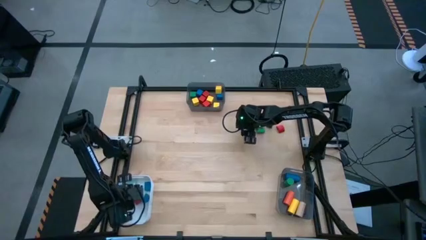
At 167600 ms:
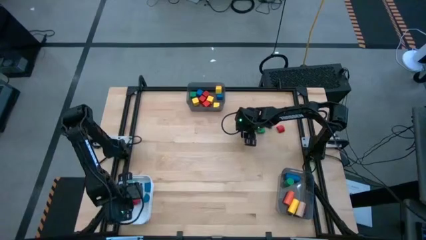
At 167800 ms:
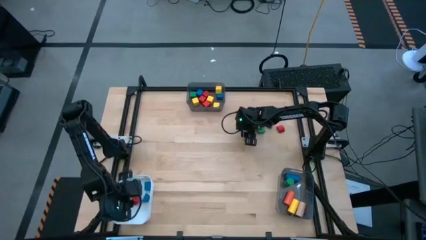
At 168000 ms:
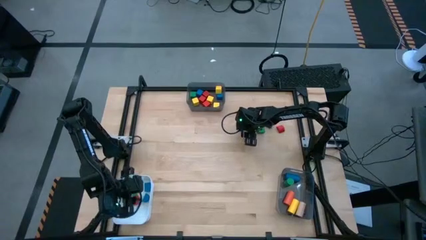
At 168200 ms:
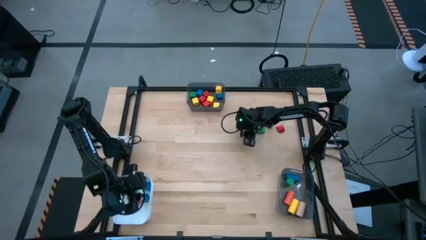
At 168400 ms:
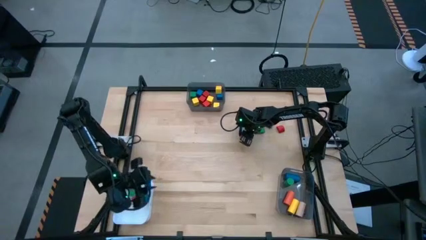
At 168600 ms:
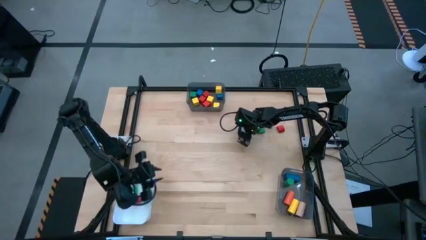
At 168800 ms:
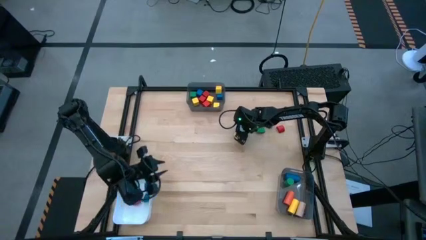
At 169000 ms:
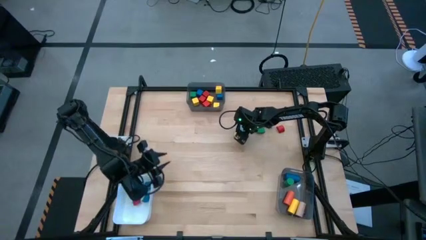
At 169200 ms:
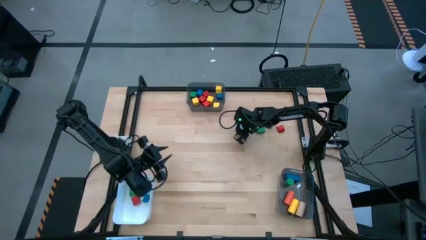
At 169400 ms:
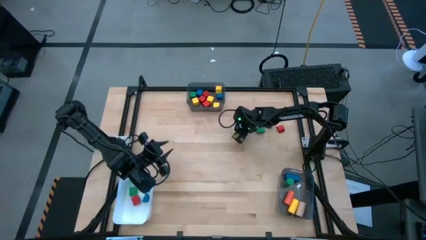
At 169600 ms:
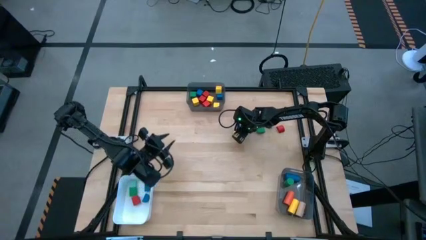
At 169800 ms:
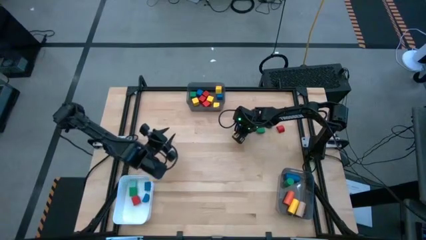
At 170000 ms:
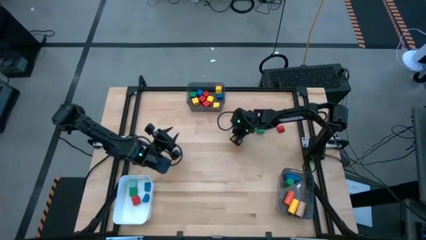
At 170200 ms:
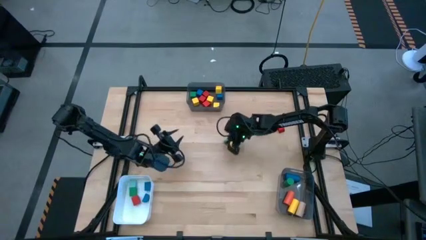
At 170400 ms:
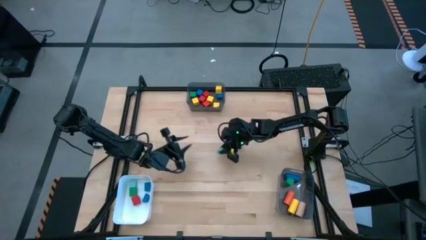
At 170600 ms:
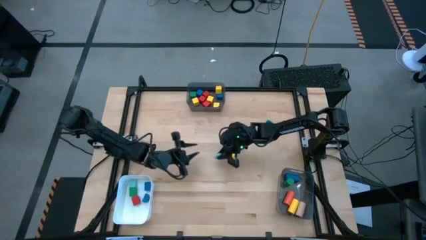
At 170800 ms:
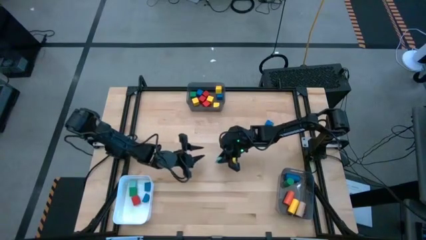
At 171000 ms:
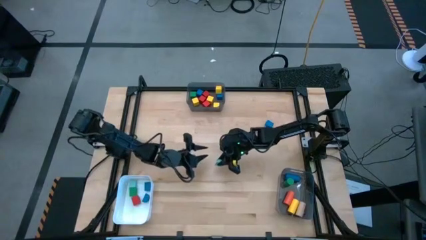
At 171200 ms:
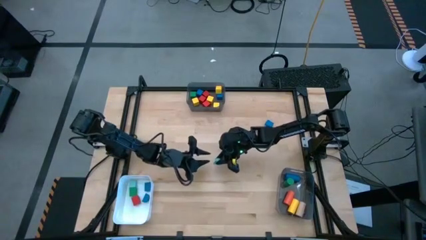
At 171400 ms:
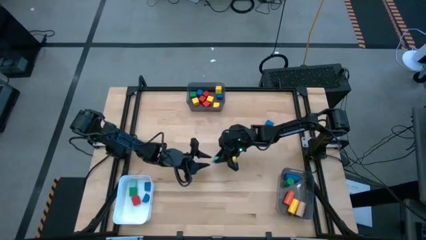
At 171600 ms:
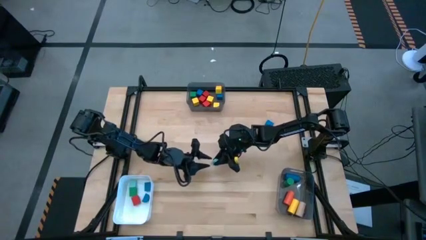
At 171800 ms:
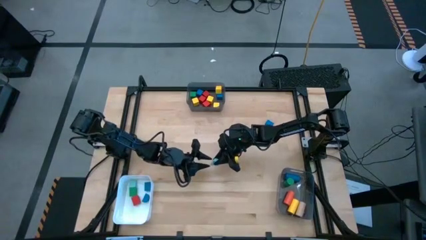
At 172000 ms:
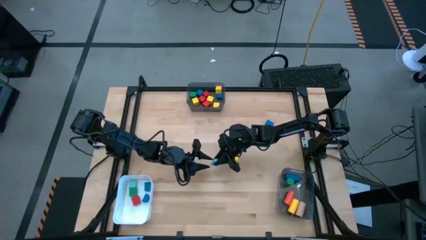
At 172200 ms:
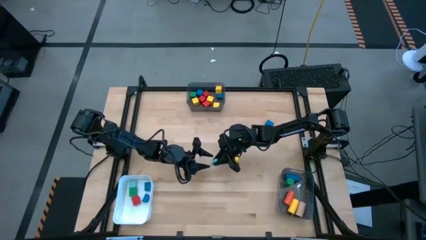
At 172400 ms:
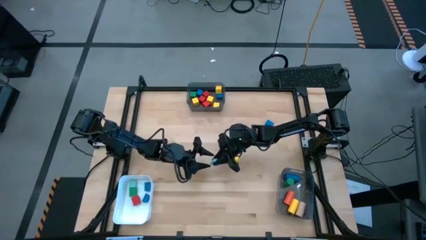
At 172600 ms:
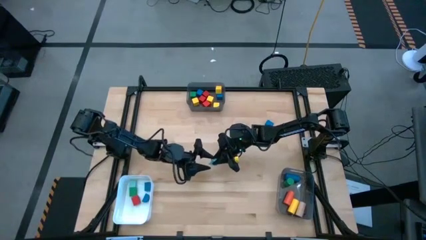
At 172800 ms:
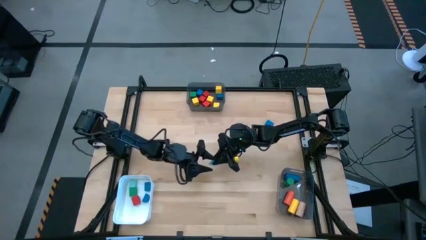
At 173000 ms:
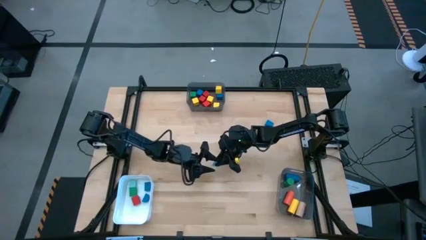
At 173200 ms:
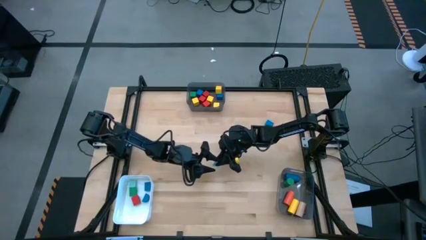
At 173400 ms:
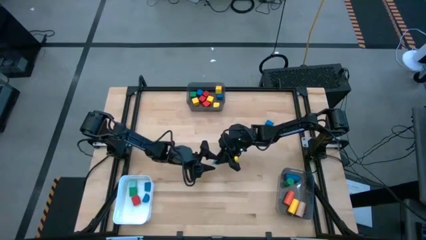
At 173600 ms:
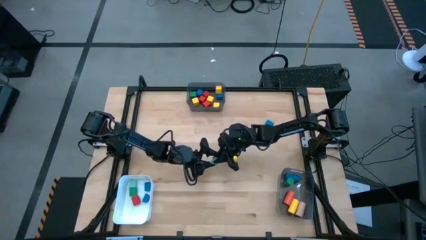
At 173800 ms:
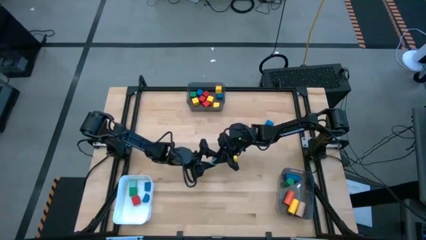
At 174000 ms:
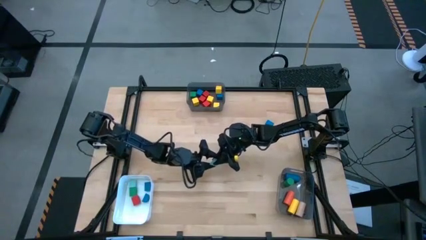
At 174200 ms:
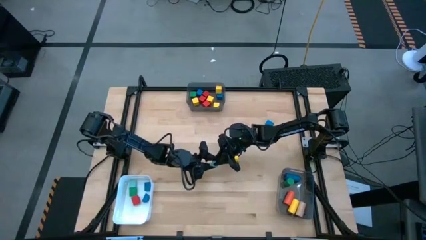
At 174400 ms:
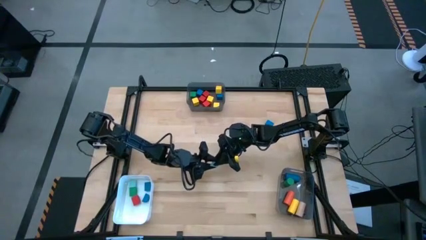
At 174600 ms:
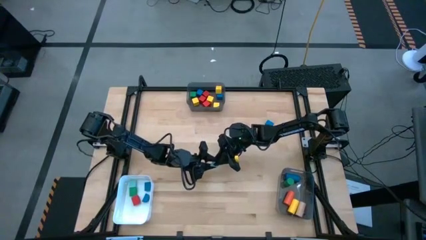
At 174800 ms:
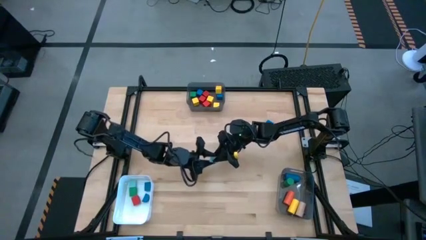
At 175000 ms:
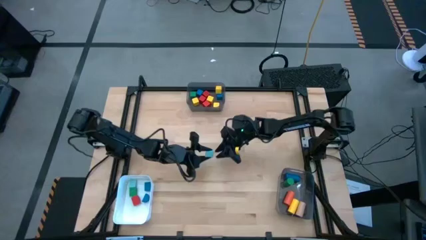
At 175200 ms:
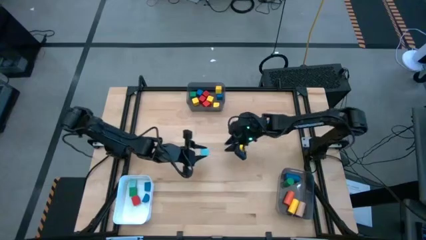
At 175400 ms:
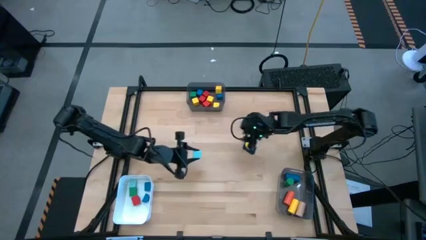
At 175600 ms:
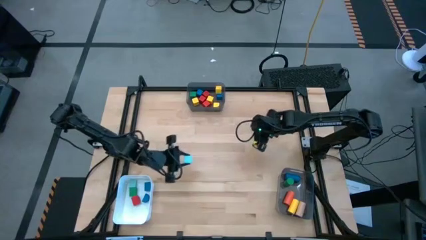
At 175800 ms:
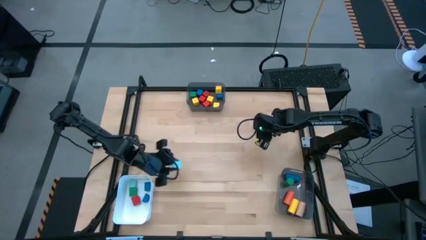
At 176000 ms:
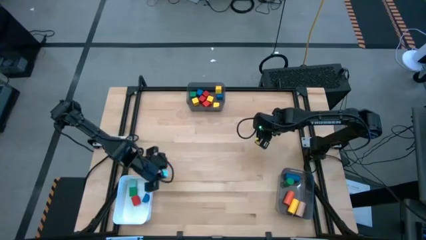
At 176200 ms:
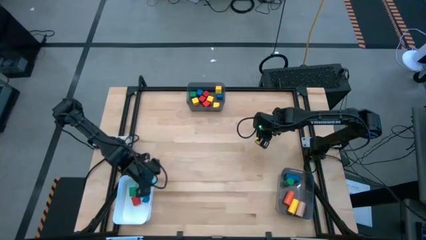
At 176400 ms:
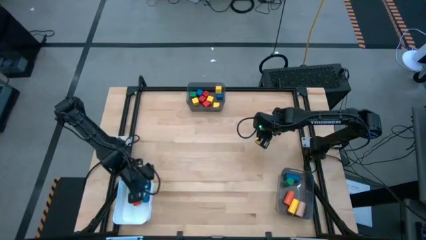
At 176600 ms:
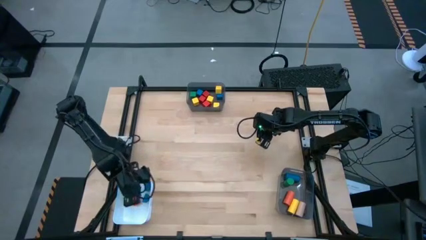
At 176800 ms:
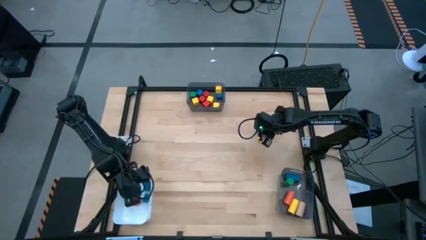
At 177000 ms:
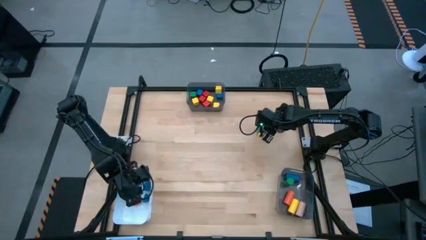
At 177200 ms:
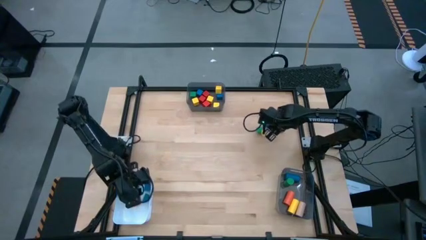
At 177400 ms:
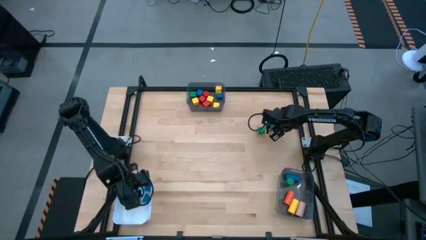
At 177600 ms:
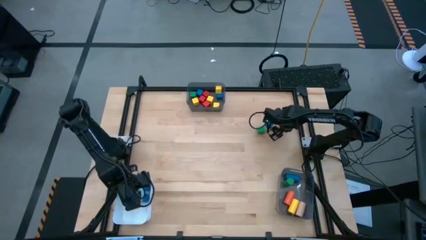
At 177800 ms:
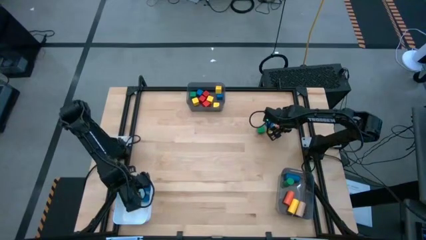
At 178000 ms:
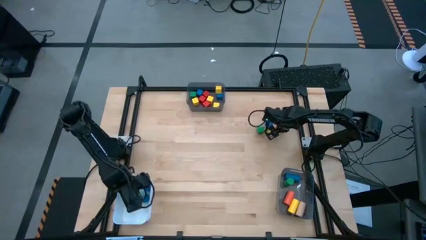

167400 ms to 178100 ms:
Task: Sort blocks by size
Put the light blue half circle block into the white bin

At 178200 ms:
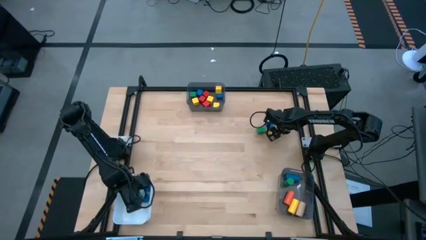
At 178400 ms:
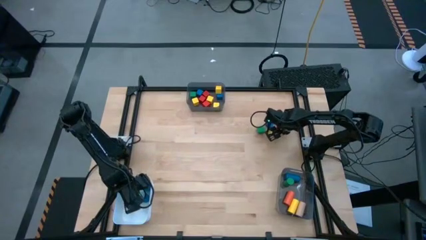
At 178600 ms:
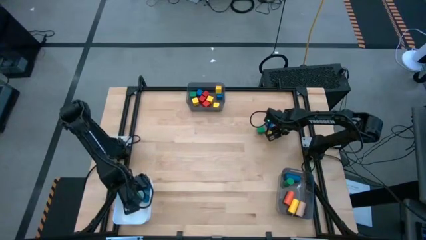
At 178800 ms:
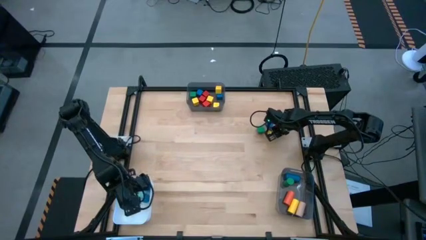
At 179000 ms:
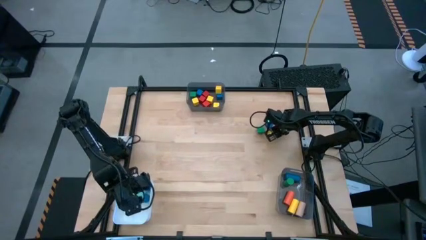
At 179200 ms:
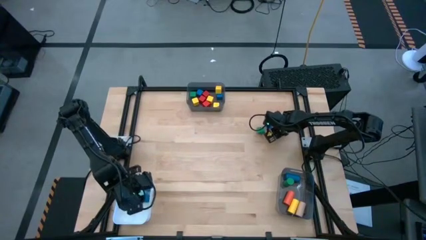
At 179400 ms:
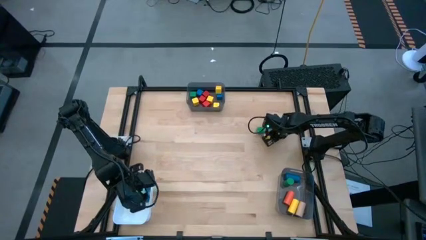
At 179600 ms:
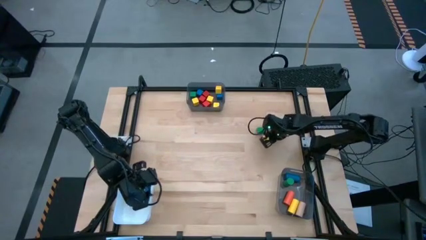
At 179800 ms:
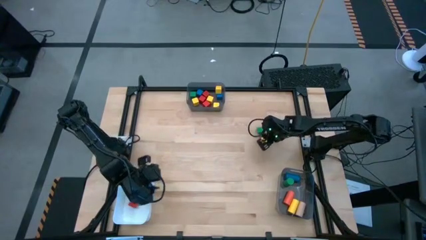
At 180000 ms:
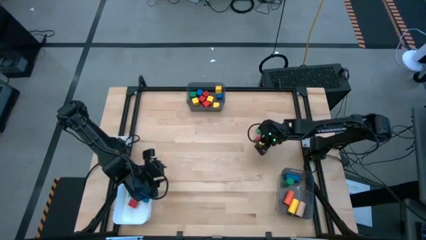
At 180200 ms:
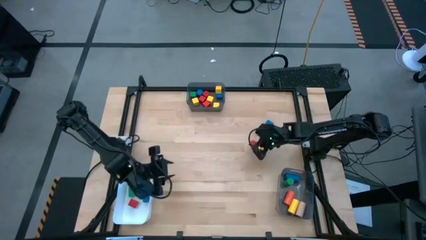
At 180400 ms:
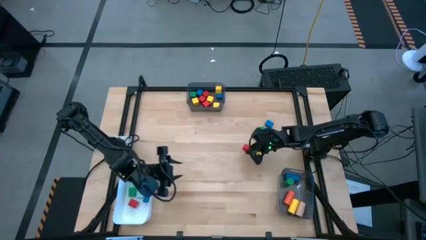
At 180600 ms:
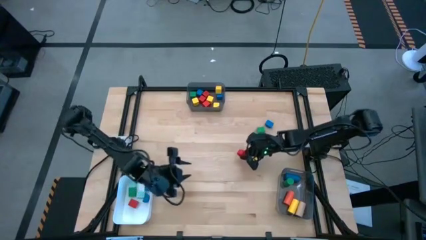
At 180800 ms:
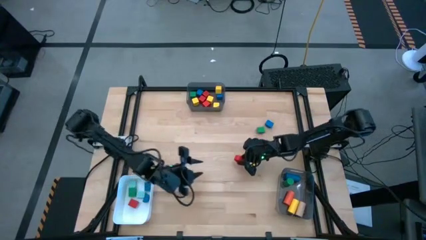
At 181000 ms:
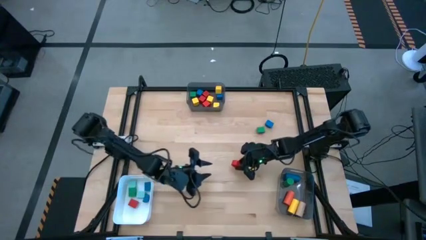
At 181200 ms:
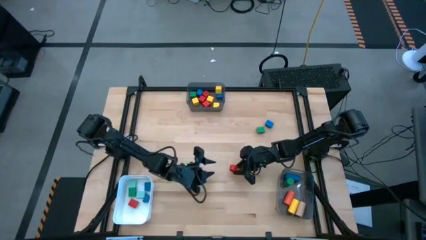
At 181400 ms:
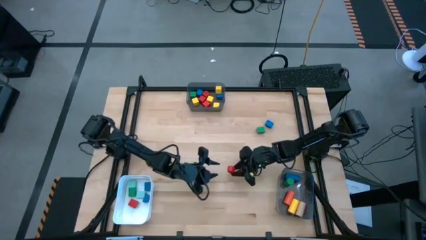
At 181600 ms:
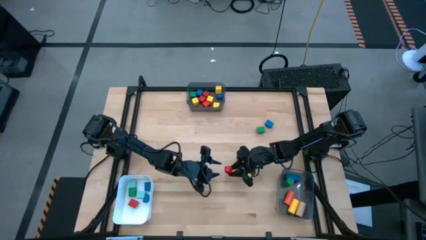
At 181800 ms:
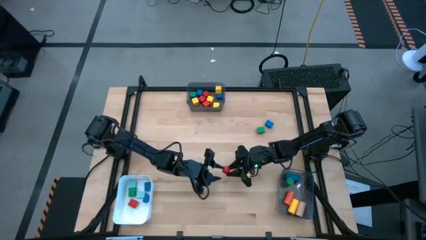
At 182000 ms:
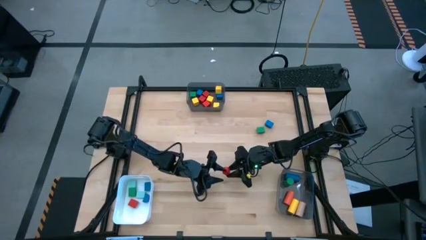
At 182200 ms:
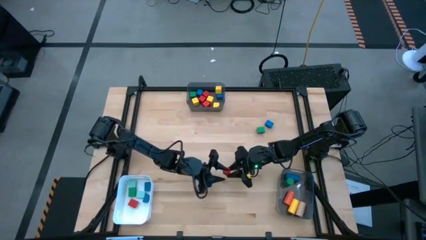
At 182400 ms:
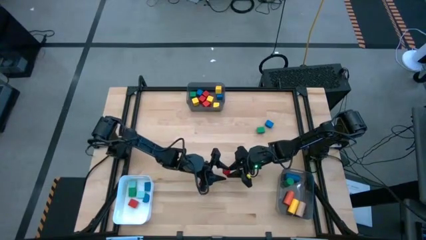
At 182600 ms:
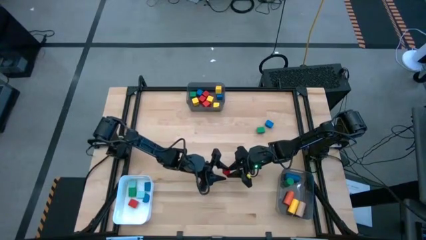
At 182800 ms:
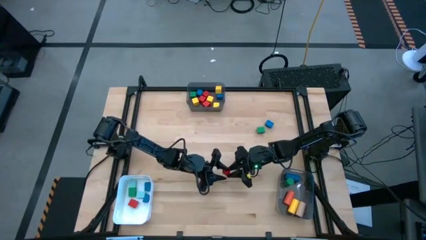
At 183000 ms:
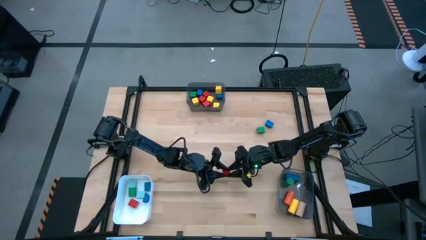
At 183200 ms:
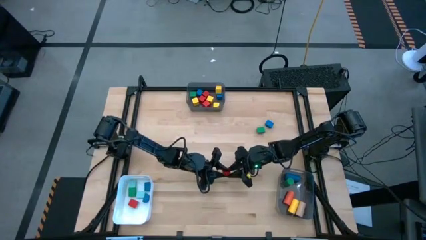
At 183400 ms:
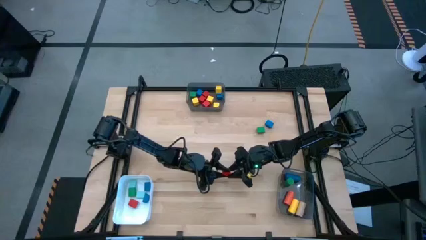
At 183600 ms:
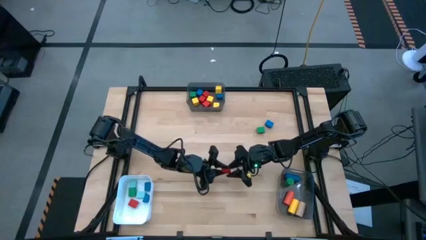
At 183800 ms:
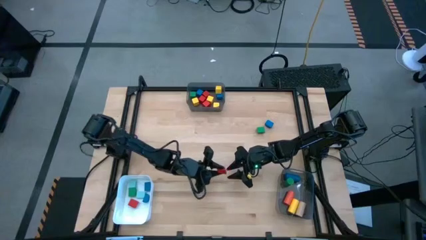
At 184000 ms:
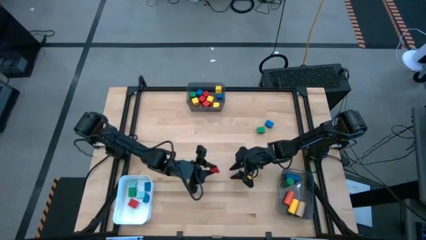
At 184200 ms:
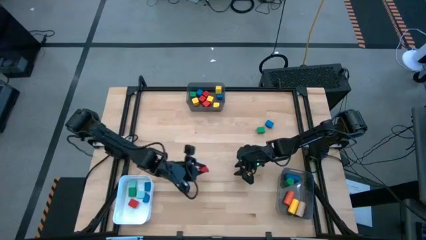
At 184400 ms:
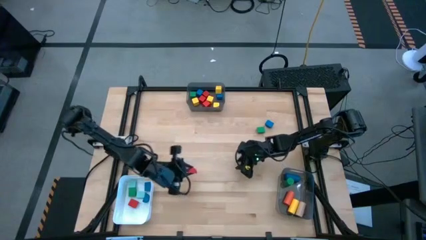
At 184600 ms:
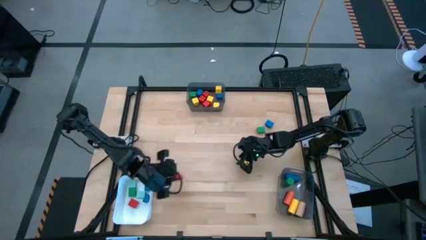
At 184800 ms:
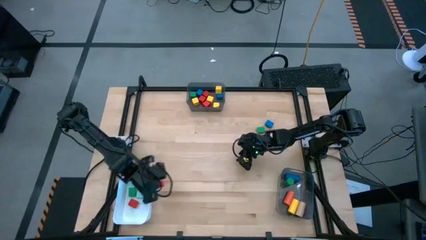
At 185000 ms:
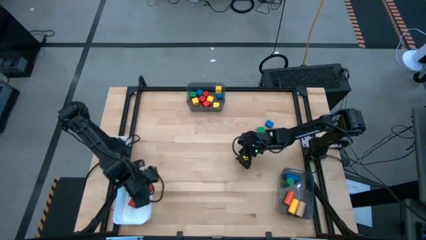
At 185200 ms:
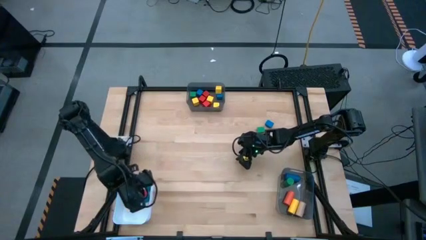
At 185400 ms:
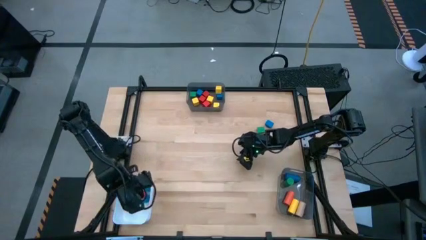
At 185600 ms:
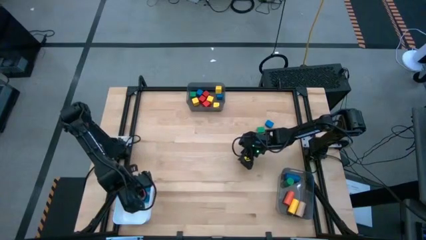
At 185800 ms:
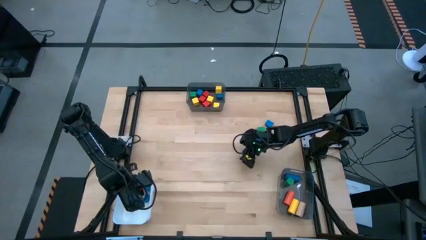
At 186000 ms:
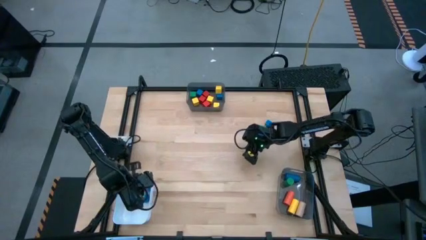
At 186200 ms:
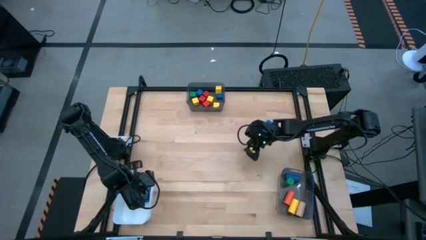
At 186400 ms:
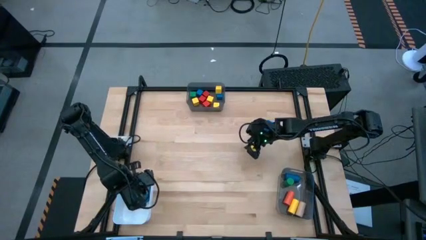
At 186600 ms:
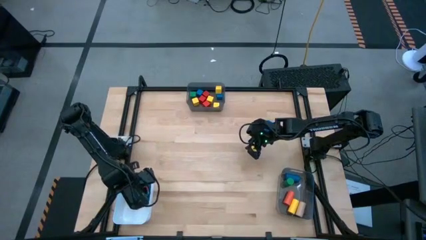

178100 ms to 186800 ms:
Put the red half circle block into the white bin
